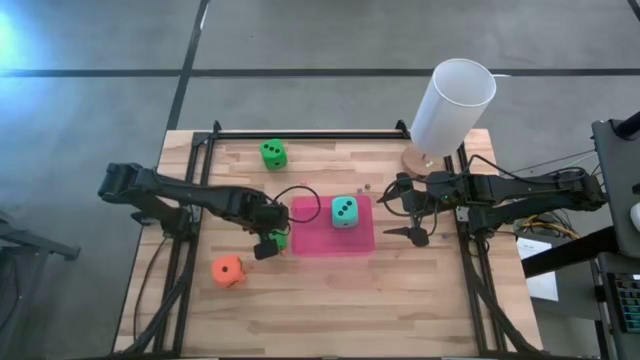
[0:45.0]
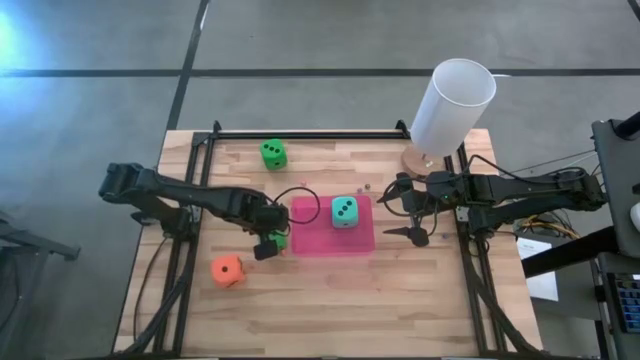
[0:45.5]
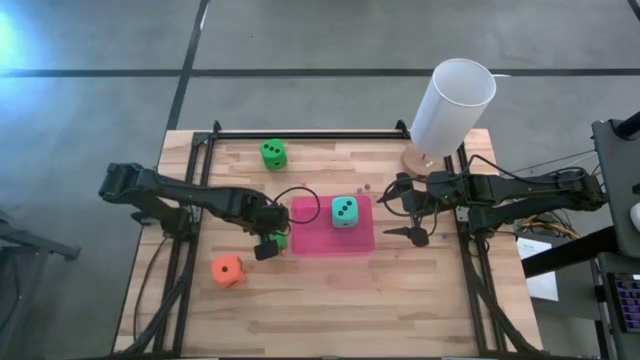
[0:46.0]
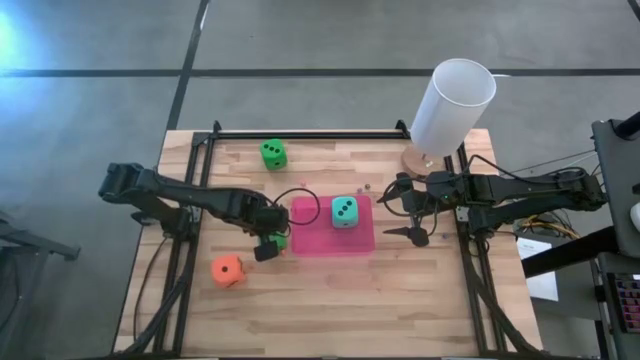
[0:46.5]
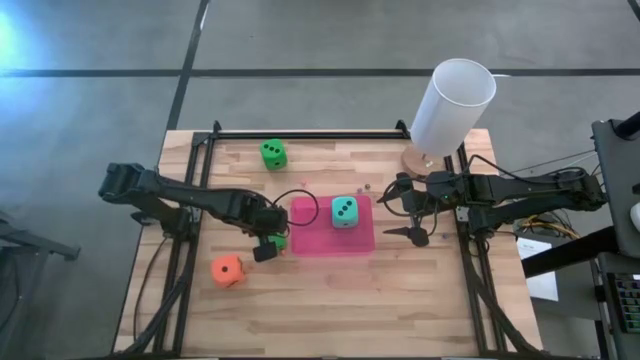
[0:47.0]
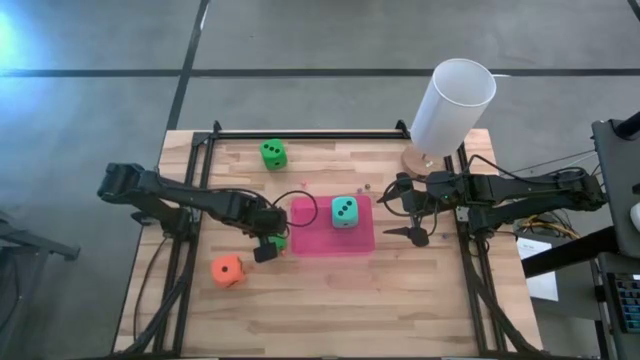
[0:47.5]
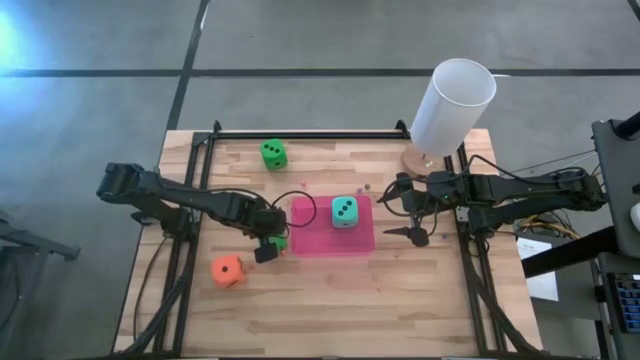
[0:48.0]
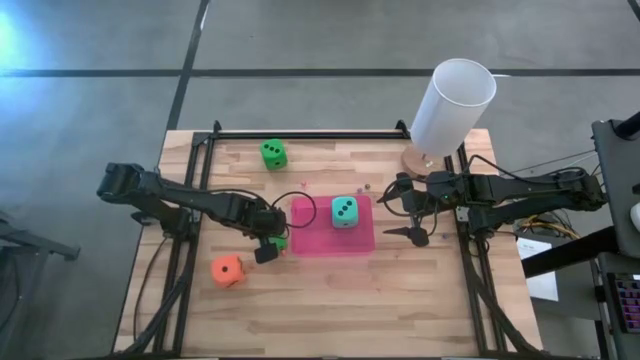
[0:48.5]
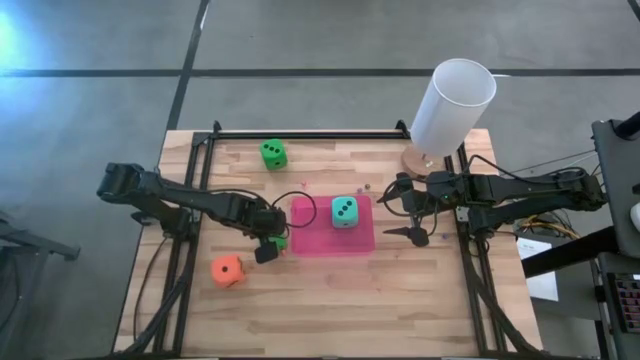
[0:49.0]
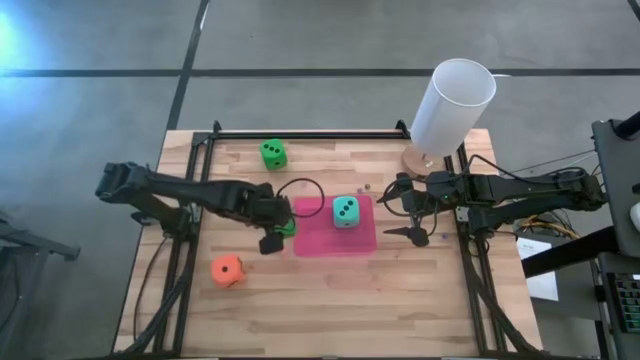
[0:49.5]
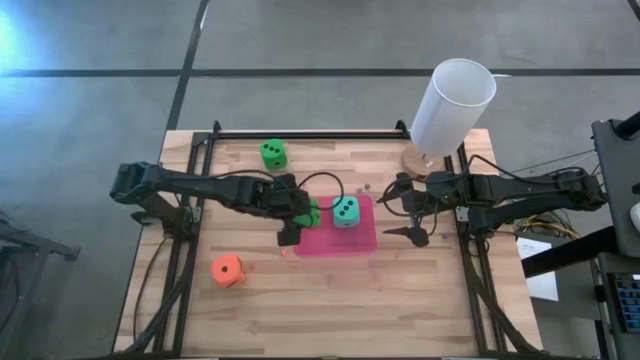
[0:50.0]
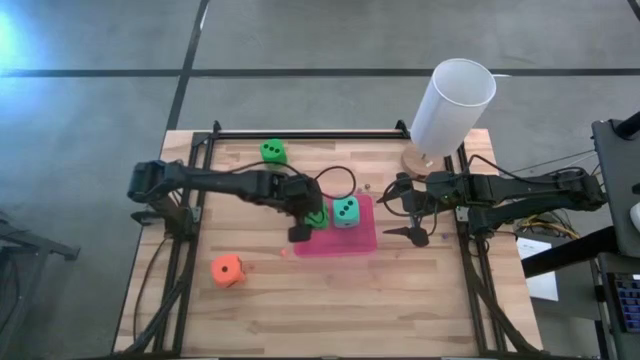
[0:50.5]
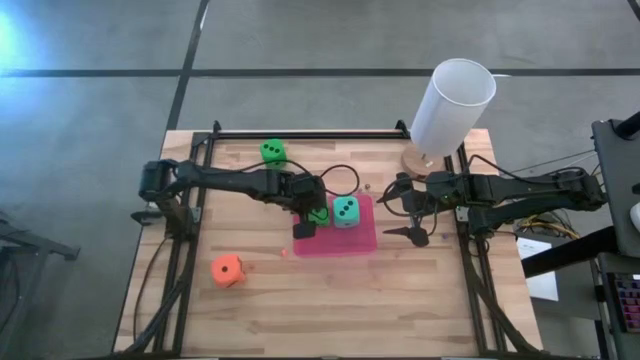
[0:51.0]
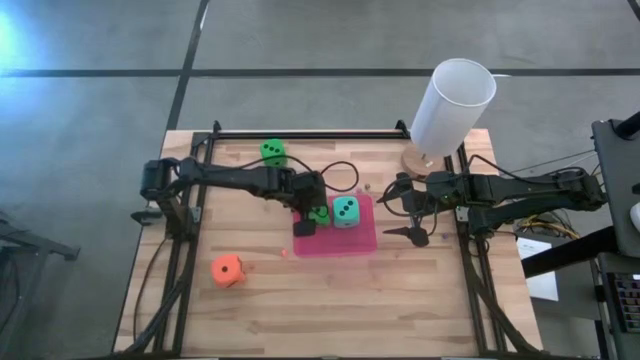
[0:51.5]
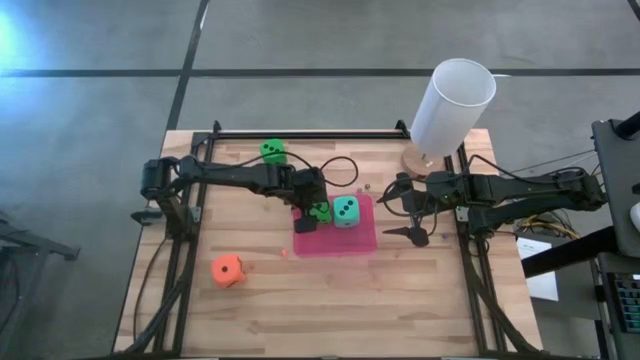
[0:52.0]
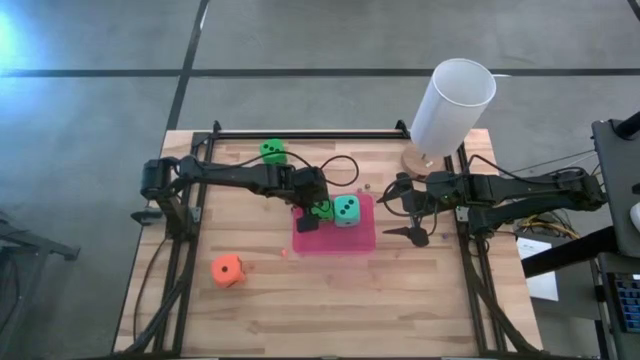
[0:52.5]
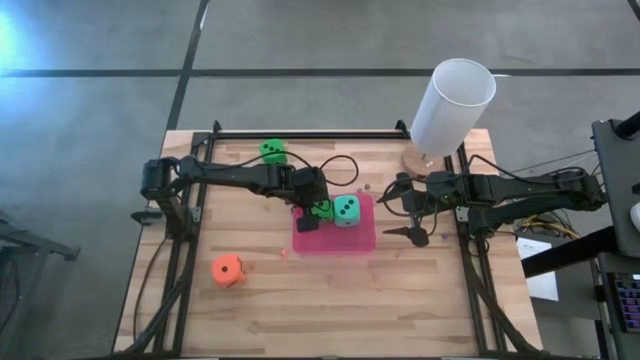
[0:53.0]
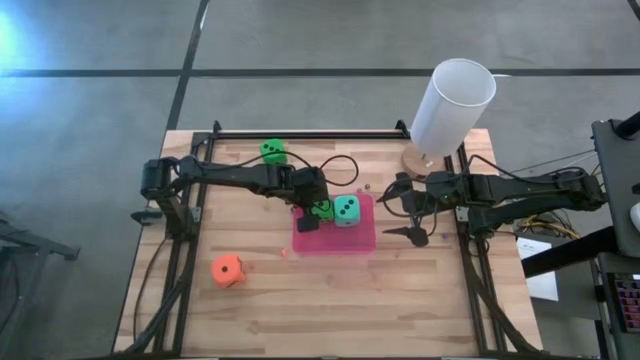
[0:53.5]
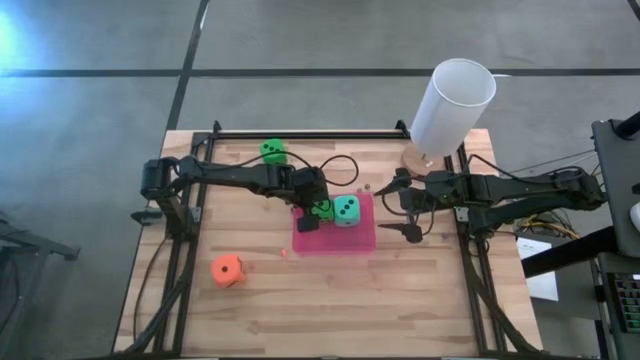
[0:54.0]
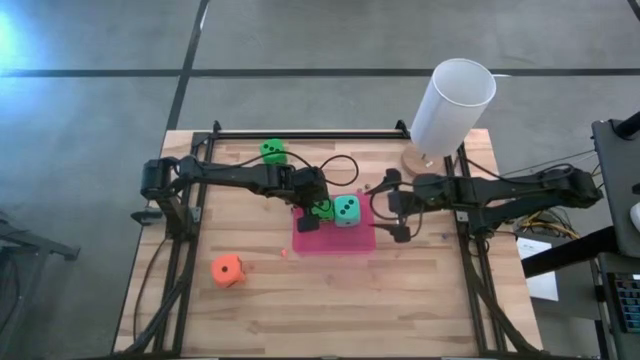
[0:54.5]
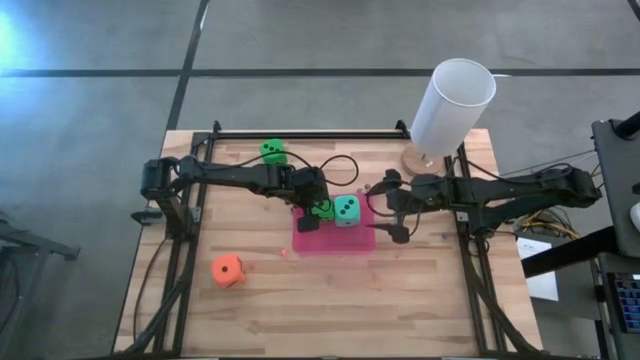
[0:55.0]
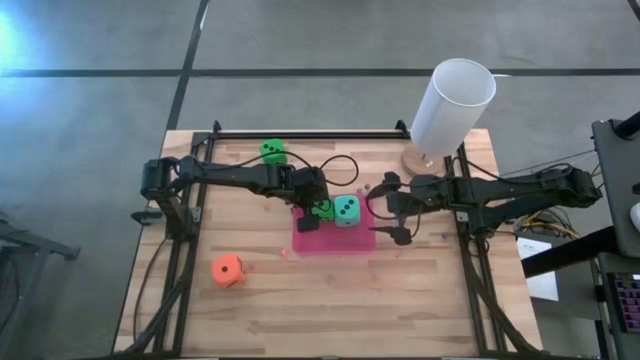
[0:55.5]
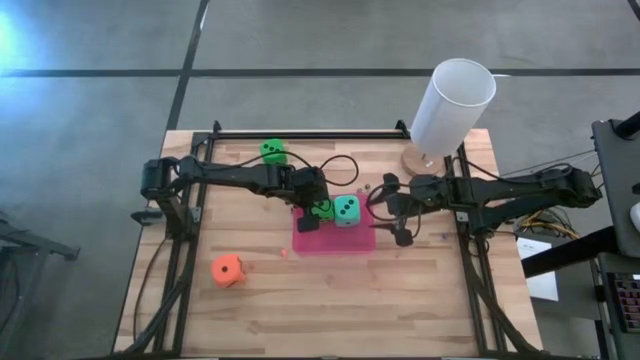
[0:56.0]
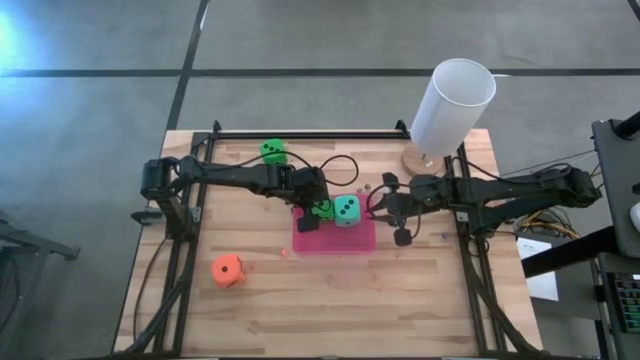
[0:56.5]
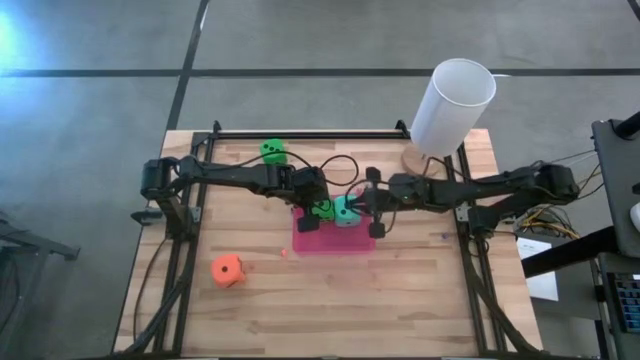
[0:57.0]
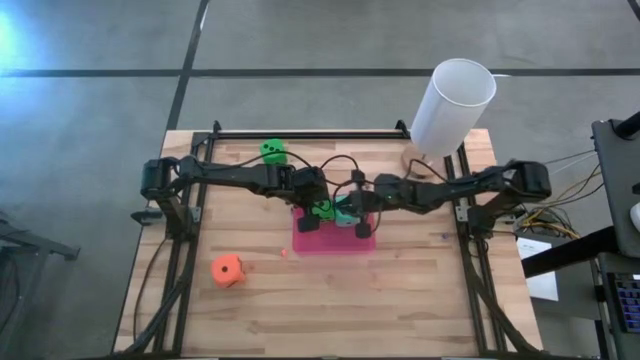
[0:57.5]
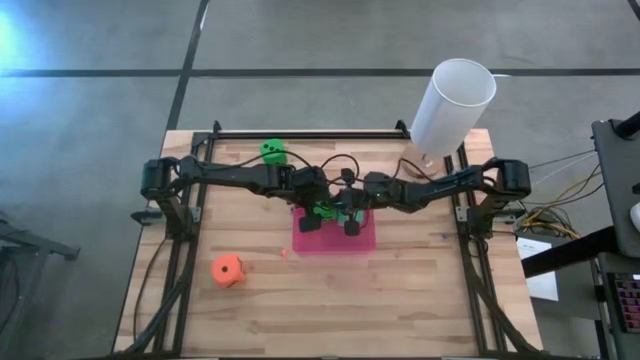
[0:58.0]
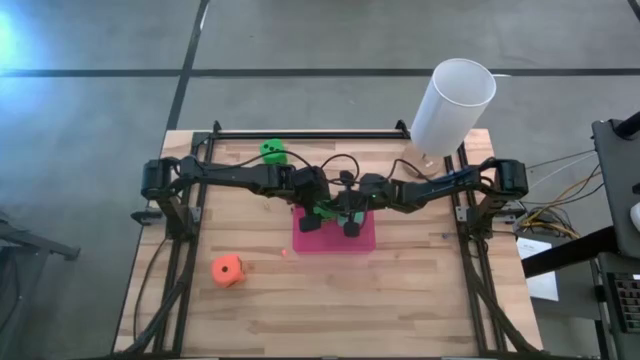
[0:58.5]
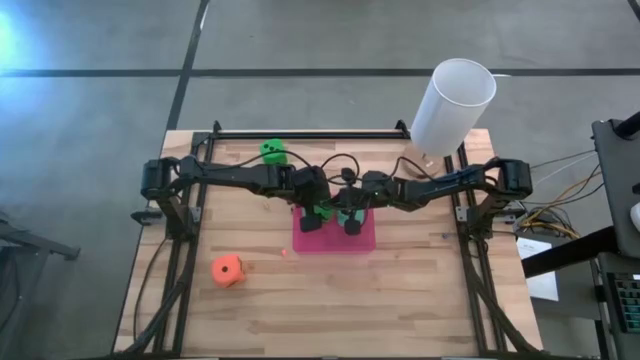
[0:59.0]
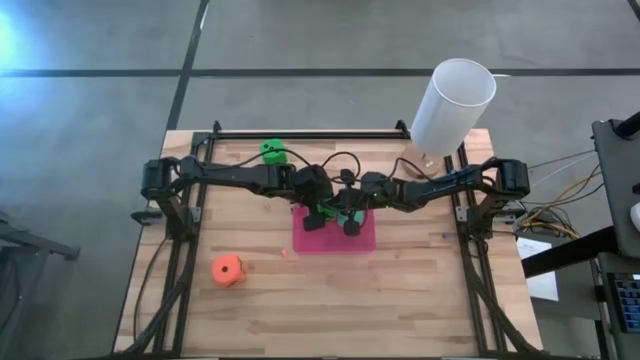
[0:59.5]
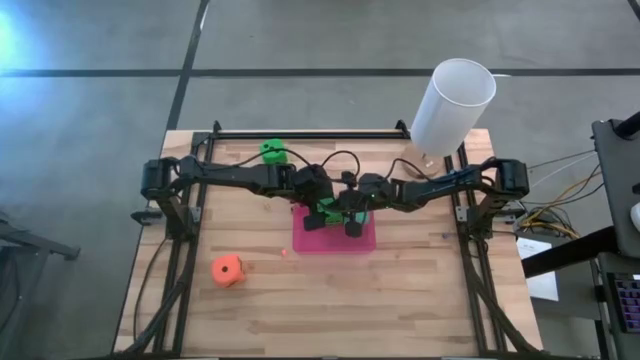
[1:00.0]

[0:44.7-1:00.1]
Task: Pick & Place Dice
Put the bottom large green die into the pink bin

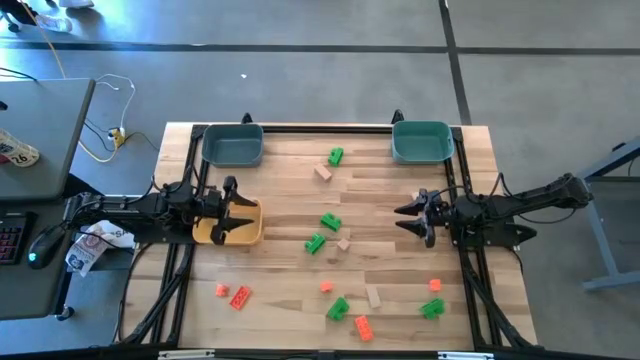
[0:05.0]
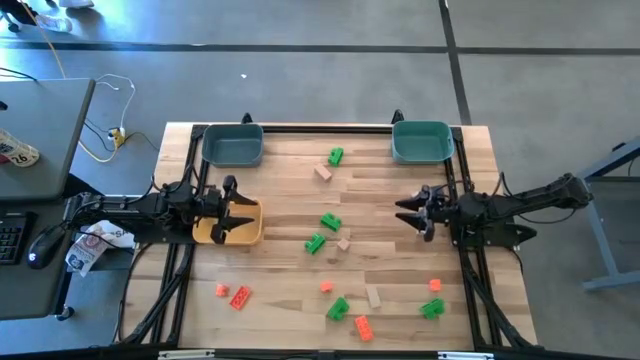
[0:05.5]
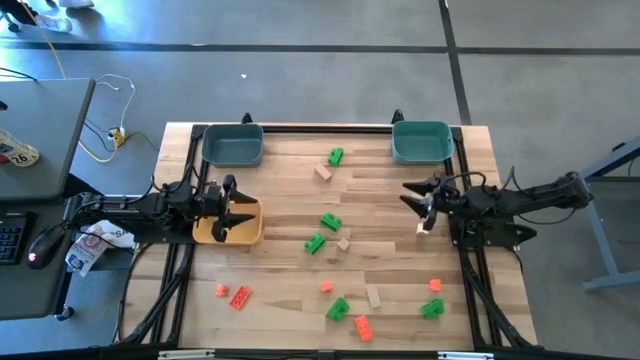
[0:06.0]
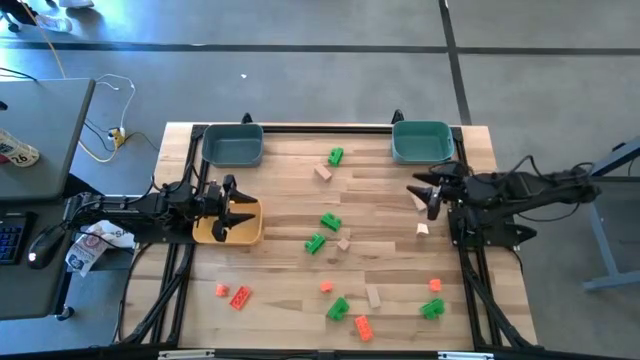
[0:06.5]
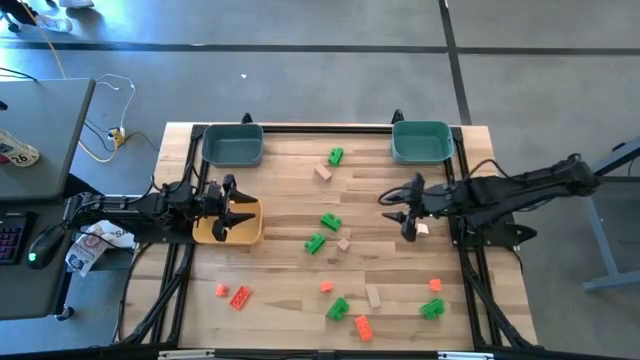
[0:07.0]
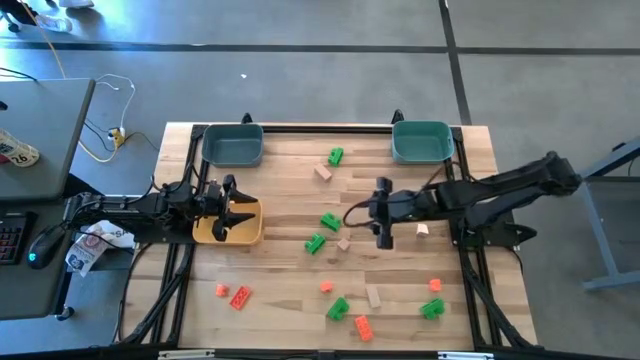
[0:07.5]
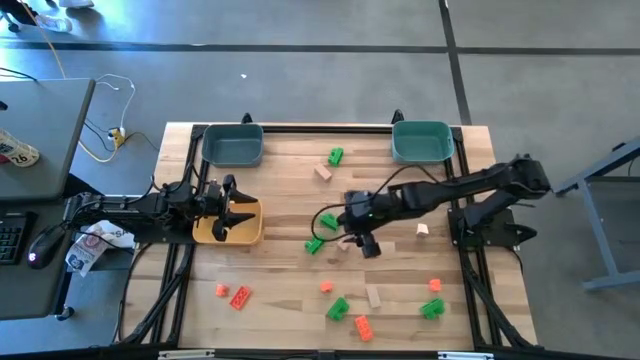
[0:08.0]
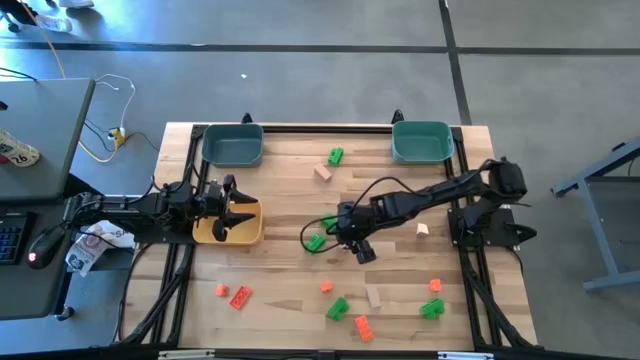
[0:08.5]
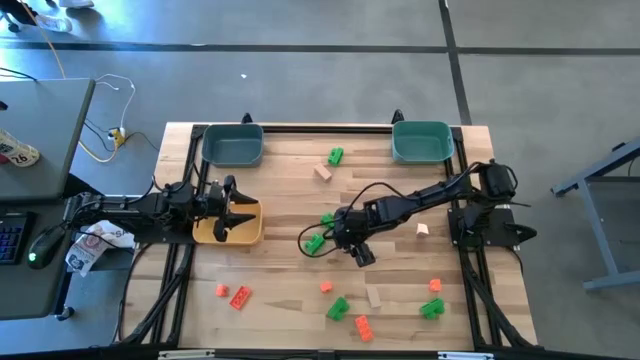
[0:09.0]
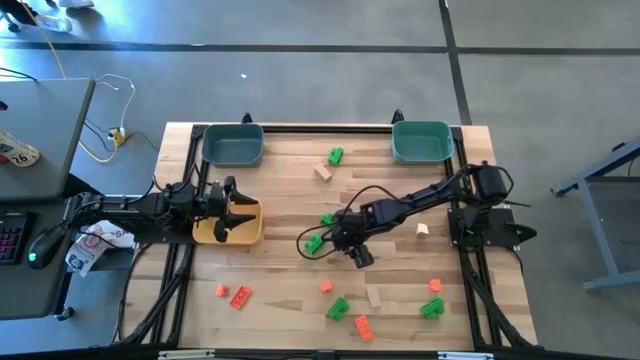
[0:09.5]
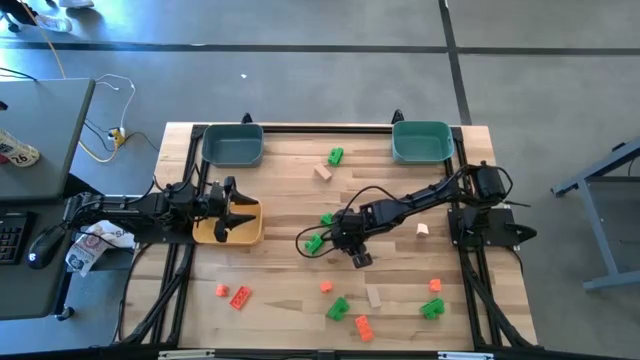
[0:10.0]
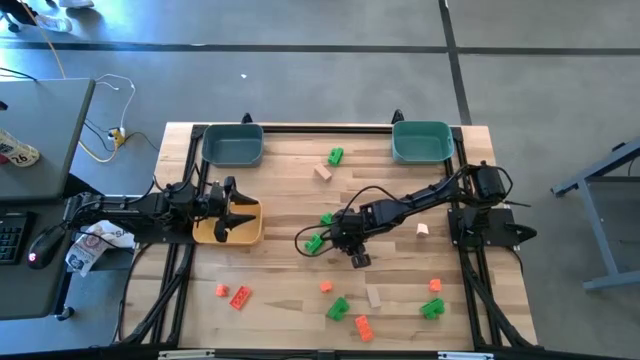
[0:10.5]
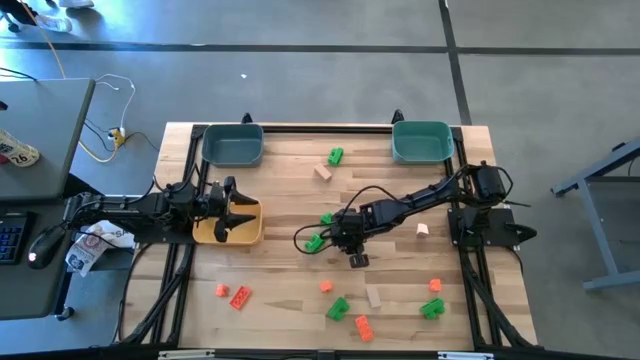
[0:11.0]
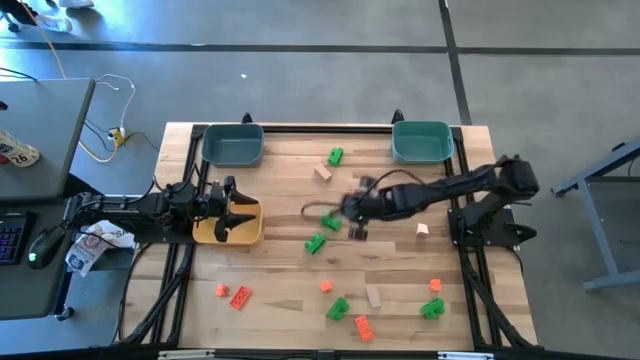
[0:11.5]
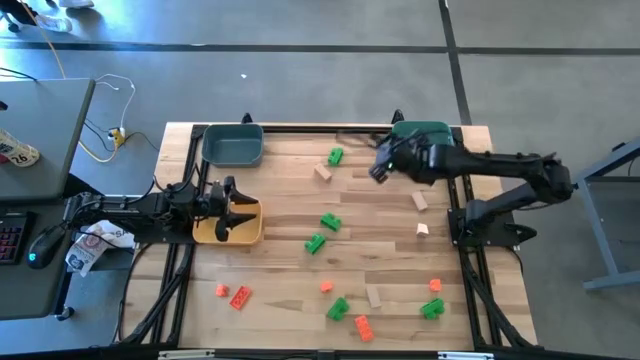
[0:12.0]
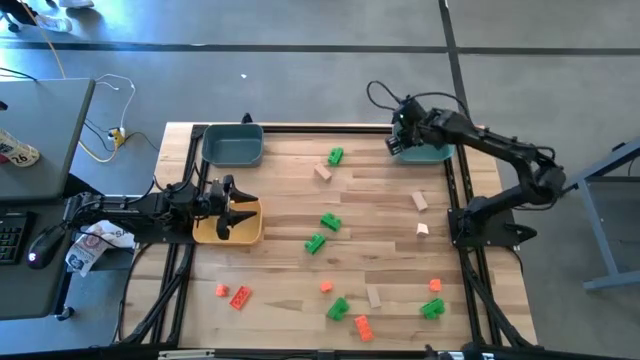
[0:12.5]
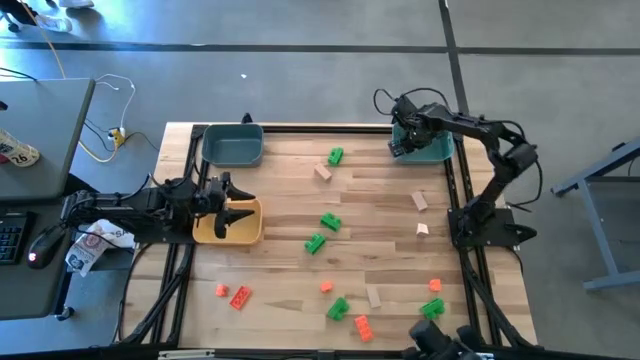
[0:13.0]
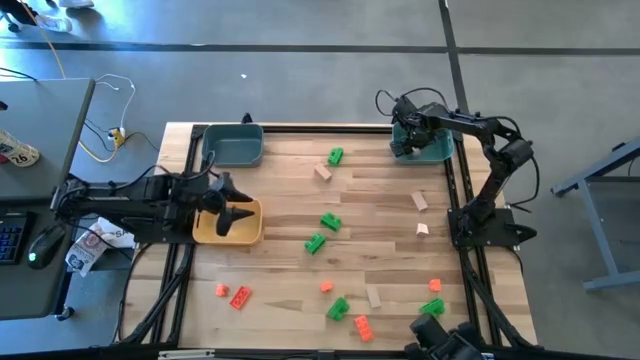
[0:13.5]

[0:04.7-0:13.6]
Task: Sort & place blocks by color
Put the brown block into the green bin
